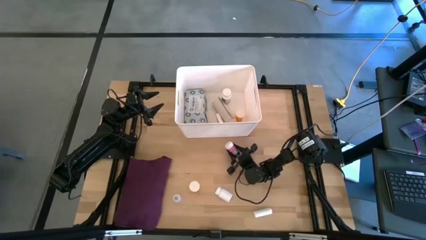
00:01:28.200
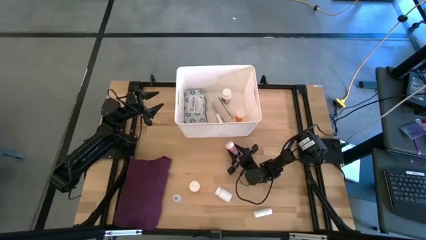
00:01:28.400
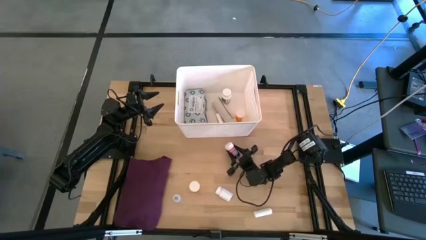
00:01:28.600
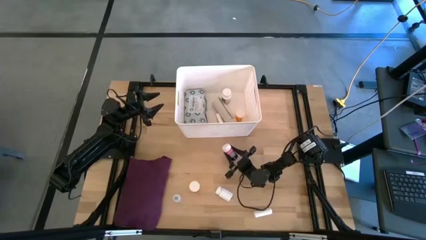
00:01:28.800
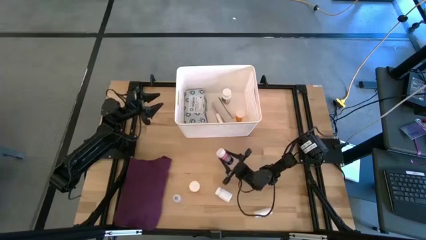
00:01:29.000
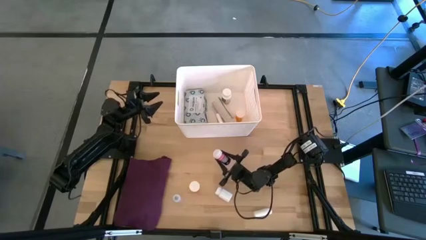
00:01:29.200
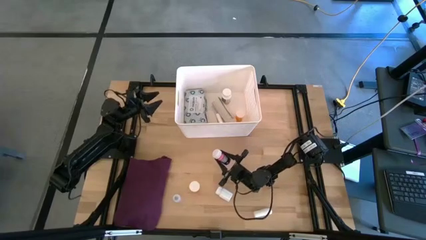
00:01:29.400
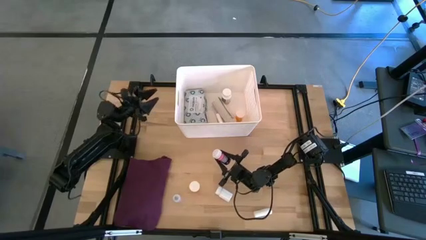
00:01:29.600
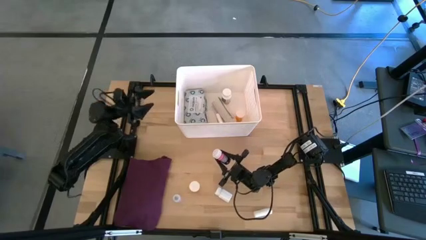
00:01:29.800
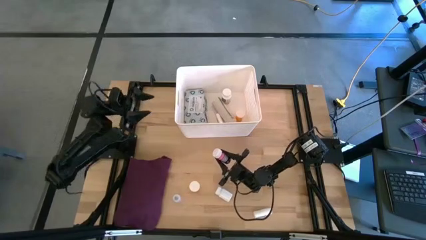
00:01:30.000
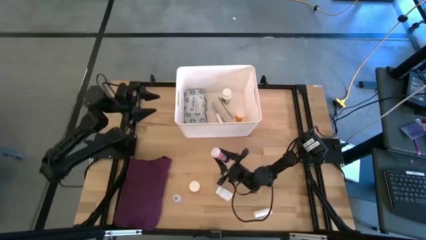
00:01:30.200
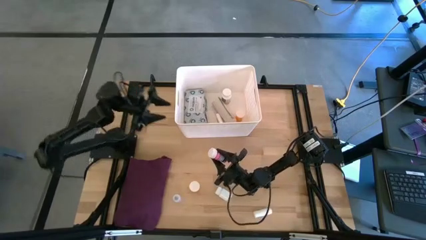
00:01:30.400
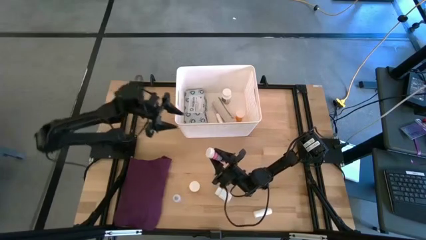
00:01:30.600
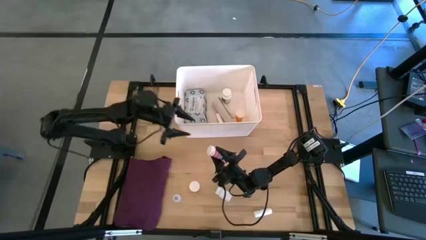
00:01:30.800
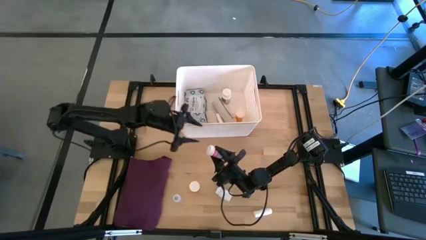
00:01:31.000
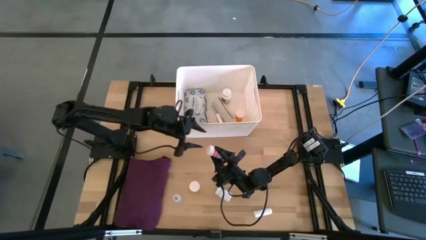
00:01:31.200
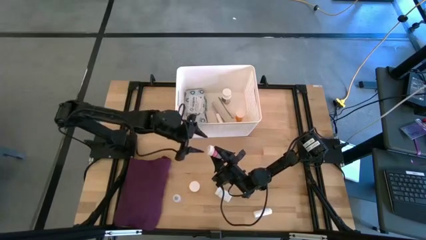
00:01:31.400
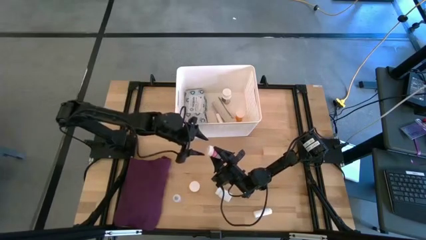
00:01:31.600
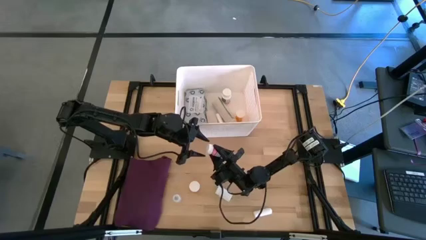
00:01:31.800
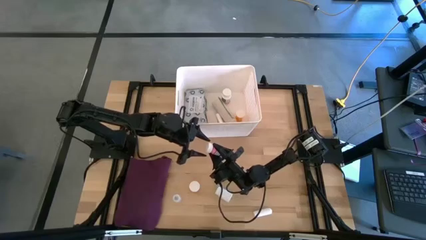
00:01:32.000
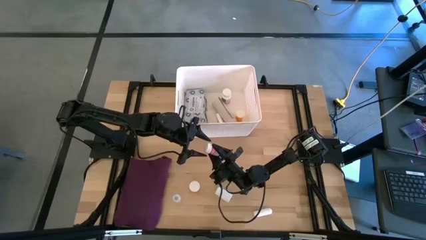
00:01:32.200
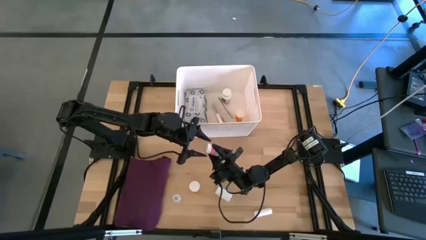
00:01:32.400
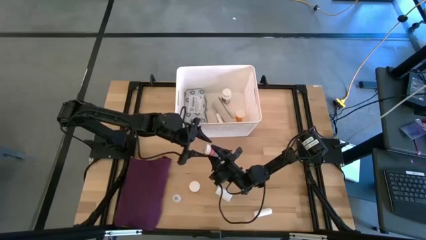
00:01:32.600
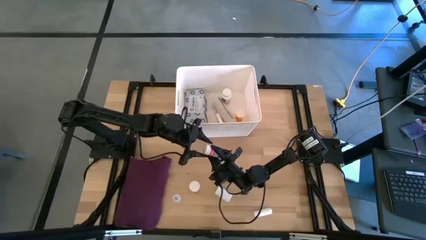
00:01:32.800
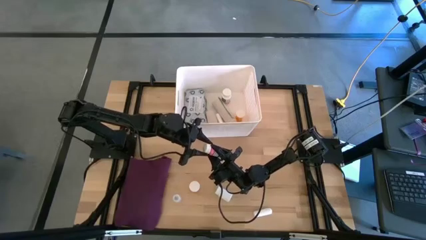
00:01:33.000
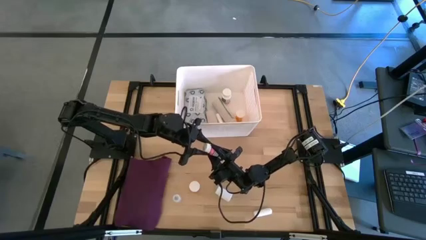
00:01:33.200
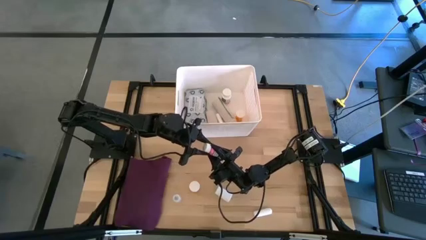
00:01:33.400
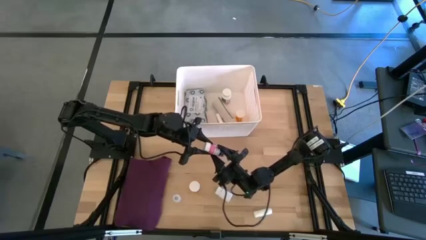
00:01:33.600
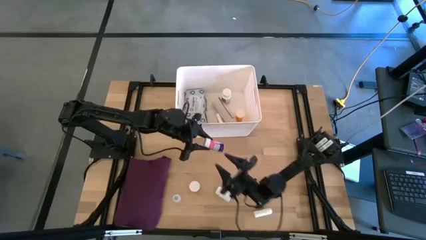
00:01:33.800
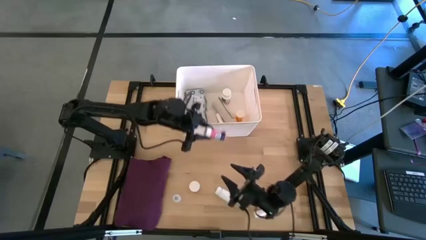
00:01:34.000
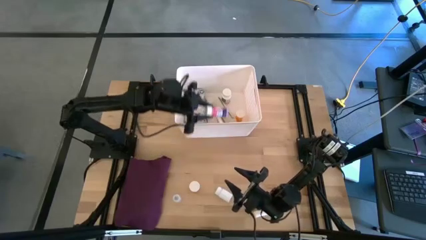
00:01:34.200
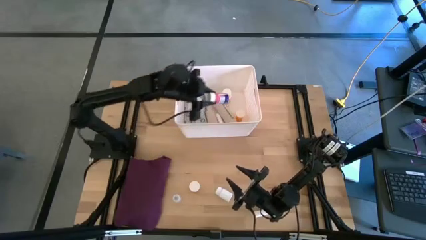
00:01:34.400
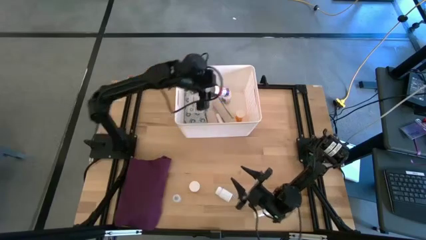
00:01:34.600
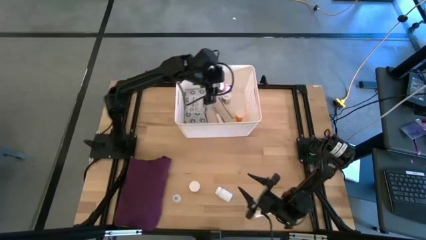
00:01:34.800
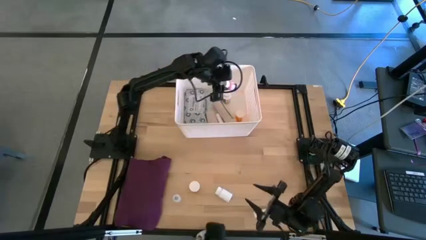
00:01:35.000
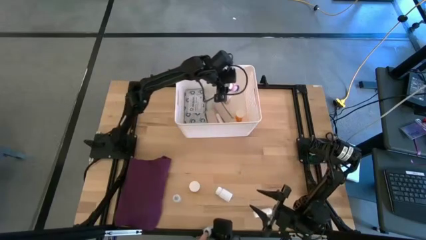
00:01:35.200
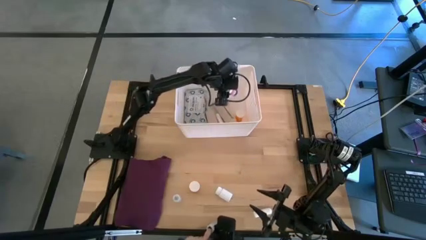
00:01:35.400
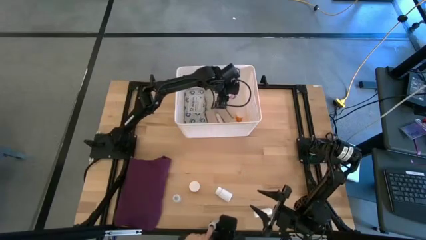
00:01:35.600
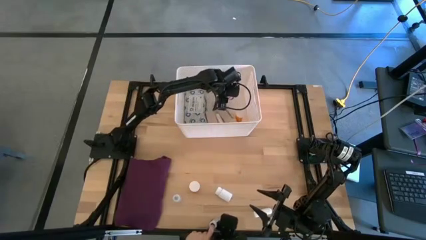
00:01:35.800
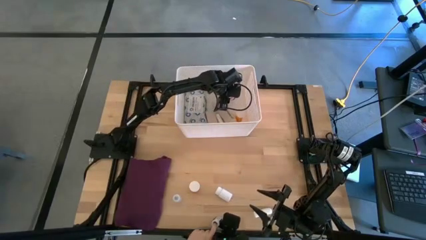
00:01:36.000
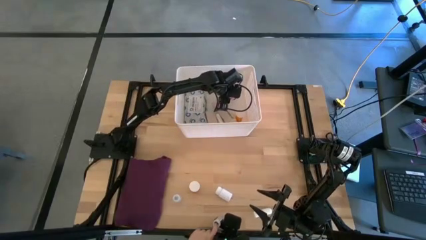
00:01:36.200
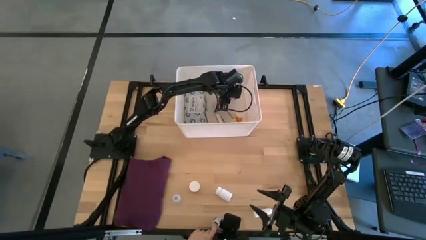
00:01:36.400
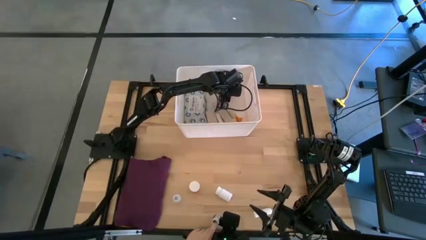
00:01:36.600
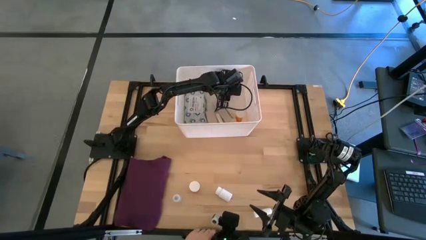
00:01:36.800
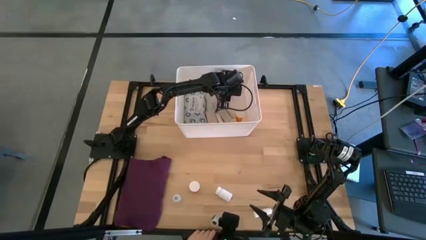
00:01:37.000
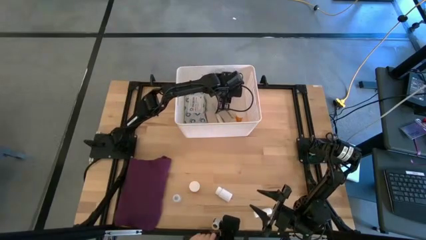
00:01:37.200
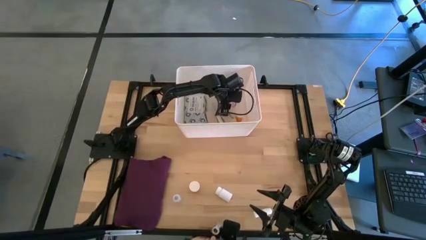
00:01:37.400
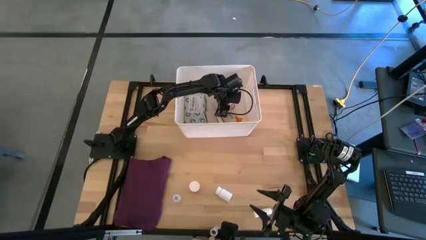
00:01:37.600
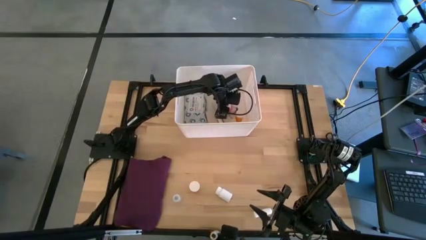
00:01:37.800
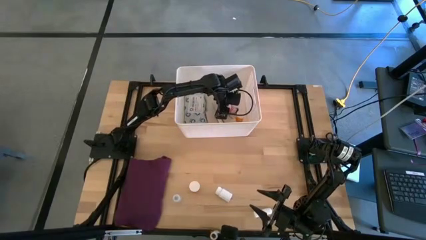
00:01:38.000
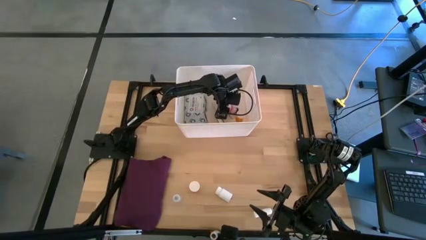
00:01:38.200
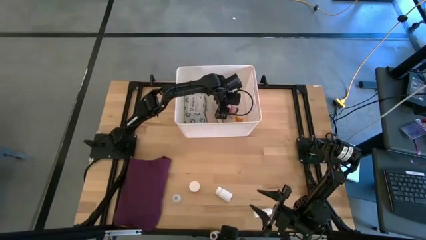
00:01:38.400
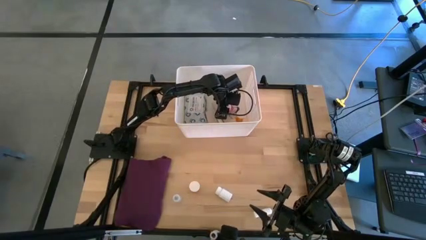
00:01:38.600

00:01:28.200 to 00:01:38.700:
Task: Pick & place medical supplies in basket/bin
Put the pink pill bottle into the white bin

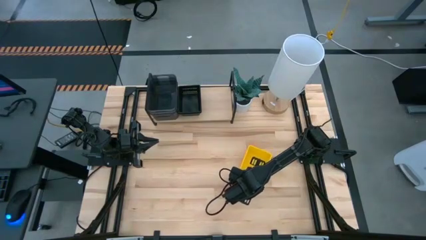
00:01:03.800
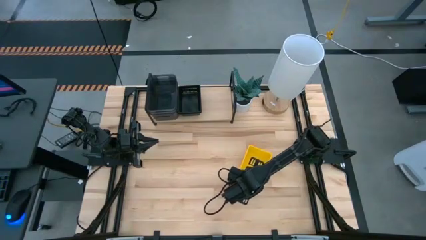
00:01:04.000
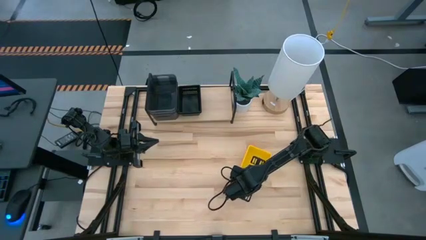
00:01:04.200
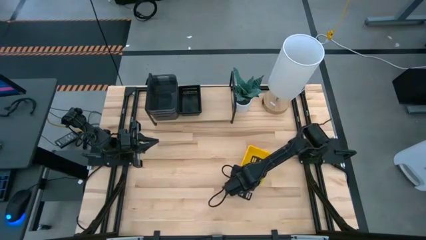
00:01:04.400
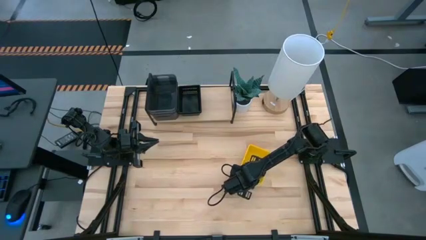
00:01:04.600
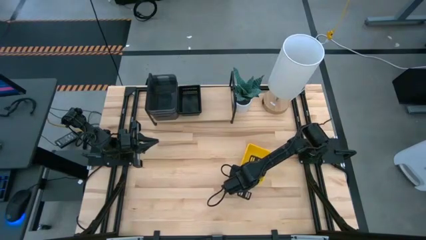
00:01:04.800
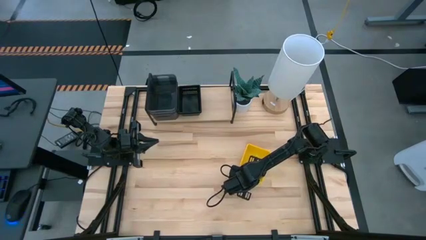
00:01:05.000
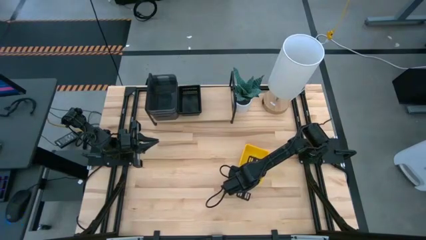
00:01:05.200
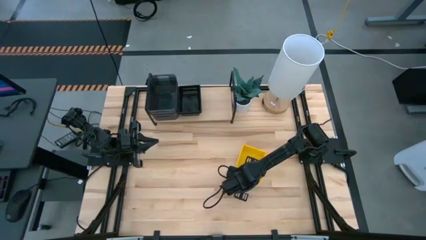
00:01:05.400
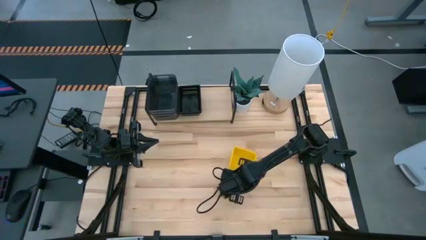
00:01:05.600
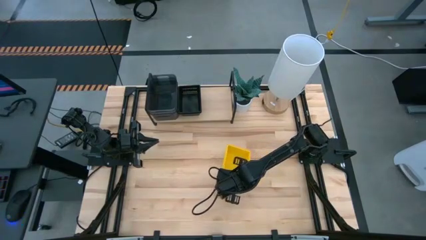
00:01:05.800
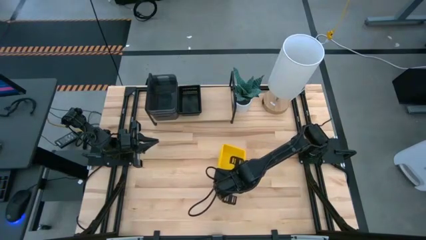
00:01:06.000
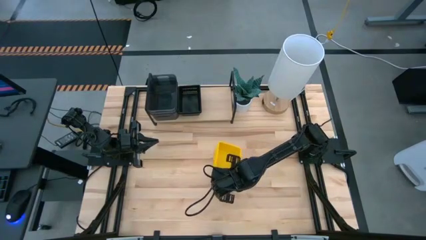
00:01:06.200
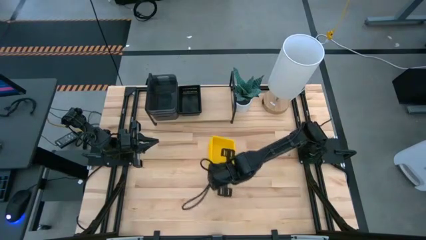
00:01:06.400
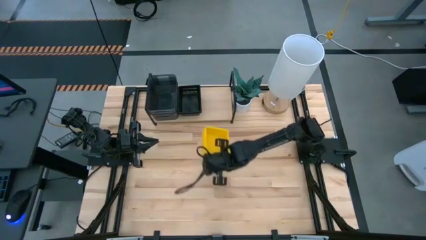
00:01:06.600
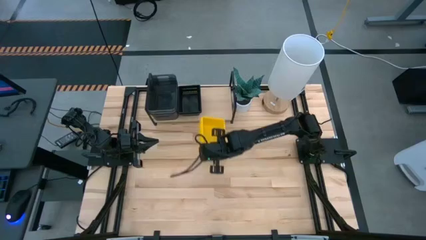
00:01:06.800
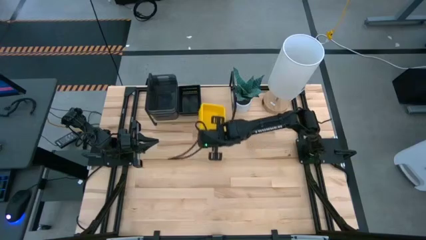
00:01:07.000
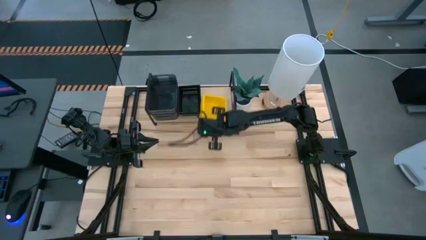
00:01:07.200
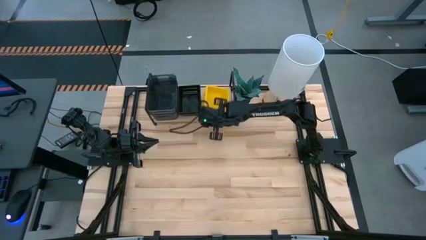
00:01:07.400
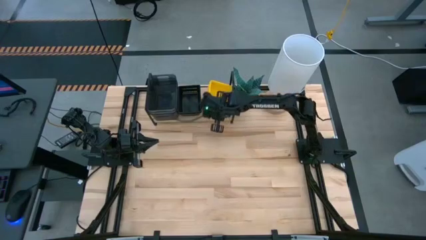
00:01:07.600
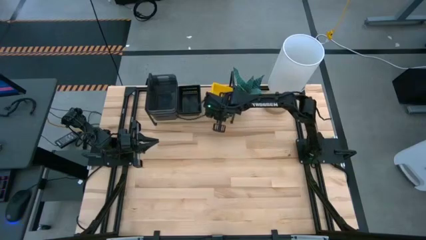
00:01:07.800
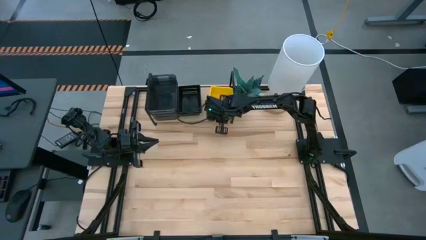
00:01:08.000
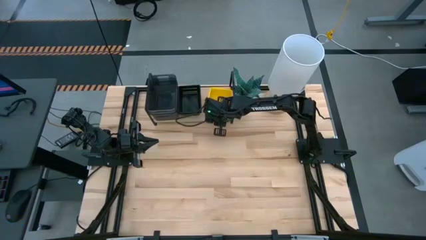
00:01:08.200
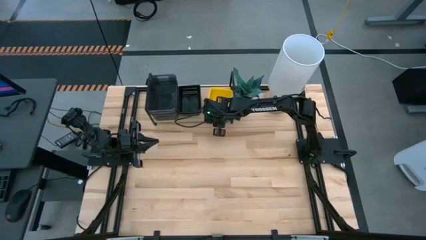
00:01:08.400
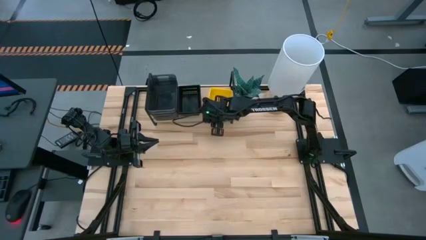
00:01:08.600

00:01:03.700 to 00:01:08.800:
Task: Stack baskets on shelf by color
Put the stacked yellow baskets on the shelf
